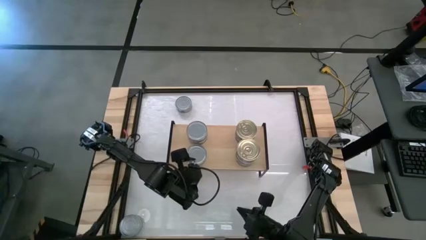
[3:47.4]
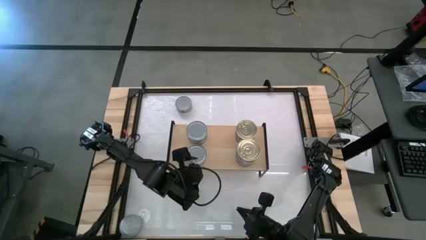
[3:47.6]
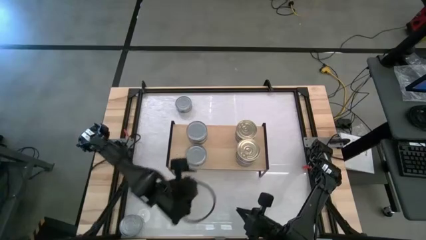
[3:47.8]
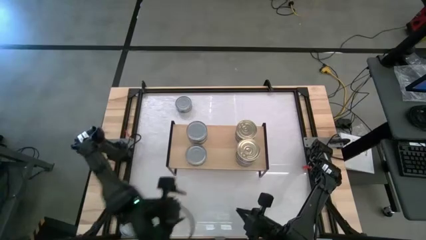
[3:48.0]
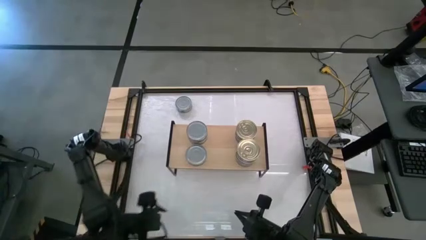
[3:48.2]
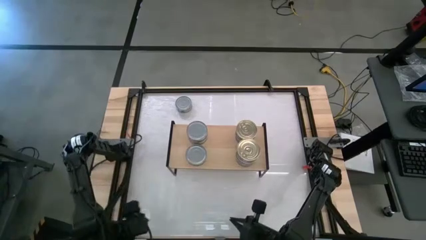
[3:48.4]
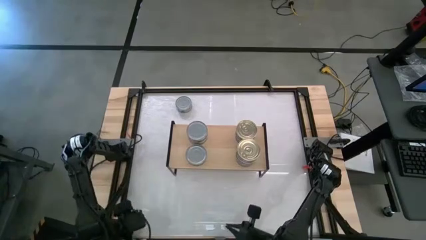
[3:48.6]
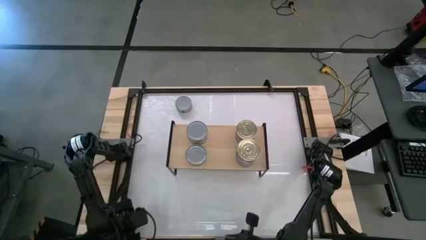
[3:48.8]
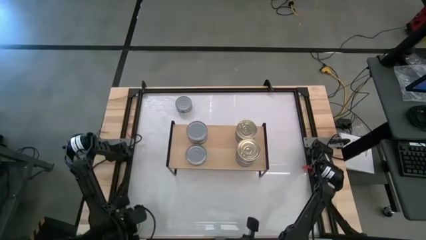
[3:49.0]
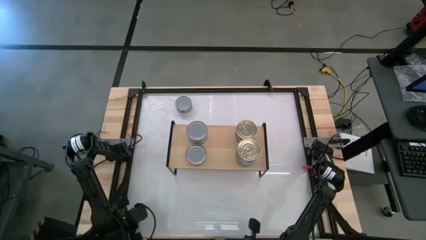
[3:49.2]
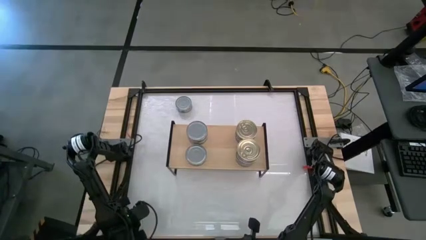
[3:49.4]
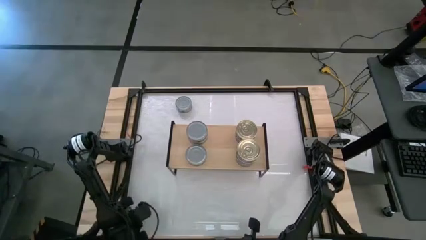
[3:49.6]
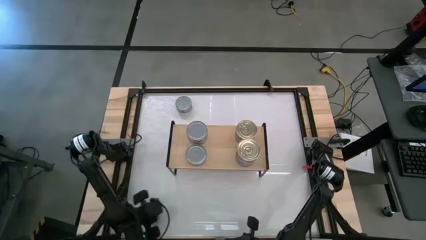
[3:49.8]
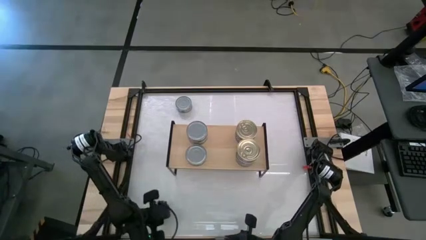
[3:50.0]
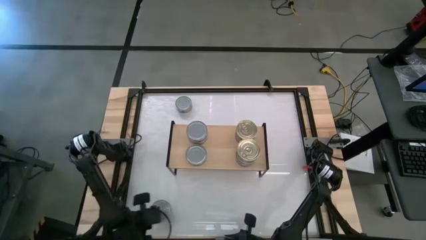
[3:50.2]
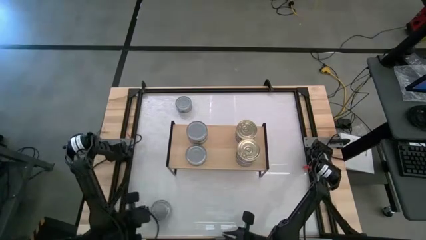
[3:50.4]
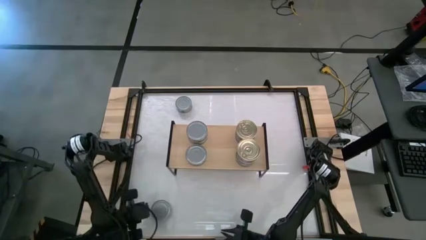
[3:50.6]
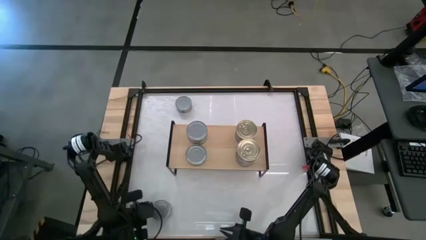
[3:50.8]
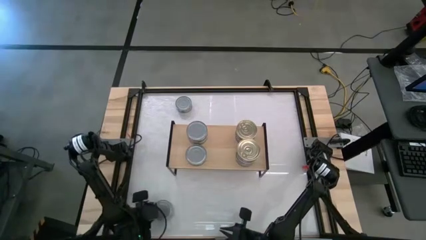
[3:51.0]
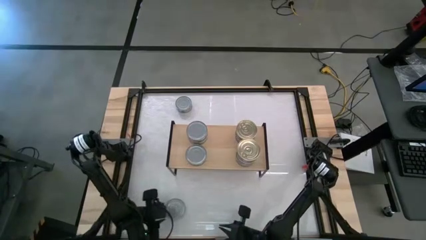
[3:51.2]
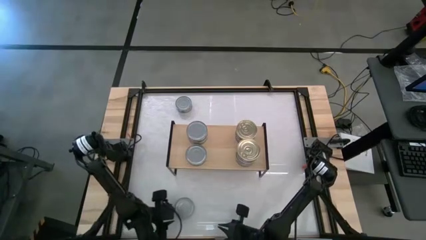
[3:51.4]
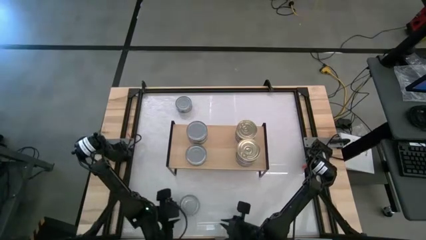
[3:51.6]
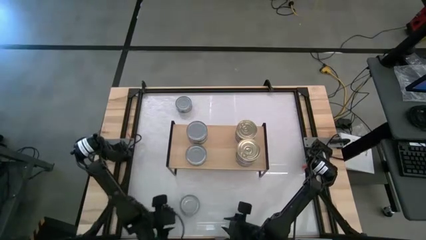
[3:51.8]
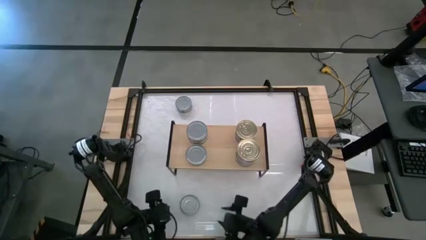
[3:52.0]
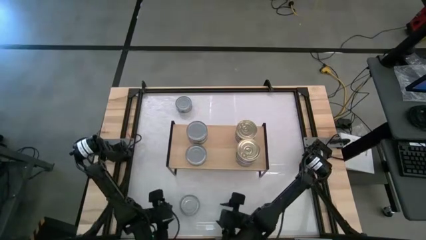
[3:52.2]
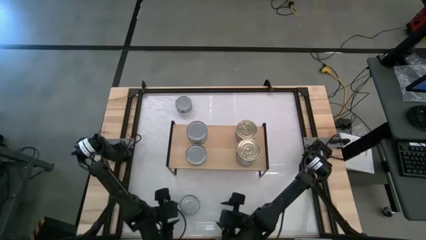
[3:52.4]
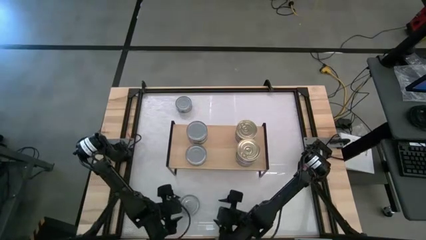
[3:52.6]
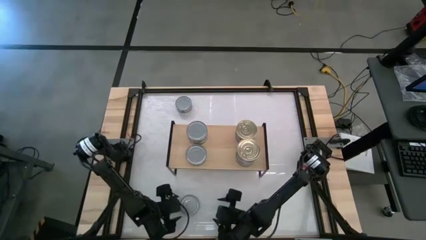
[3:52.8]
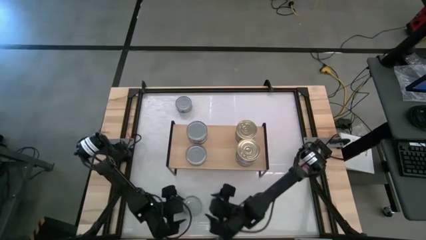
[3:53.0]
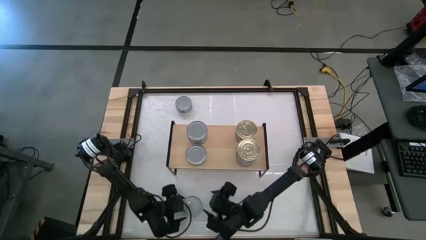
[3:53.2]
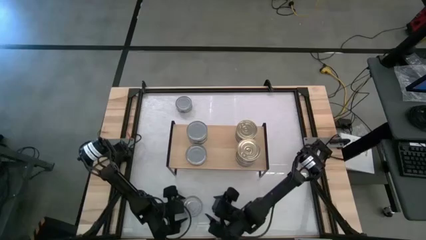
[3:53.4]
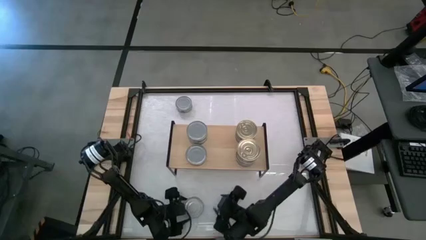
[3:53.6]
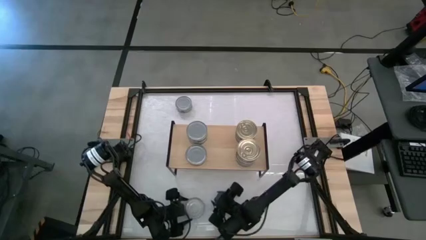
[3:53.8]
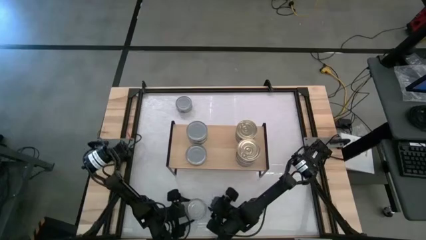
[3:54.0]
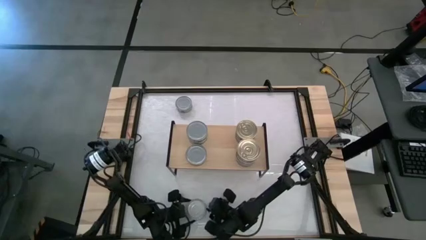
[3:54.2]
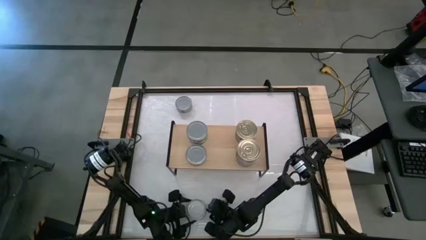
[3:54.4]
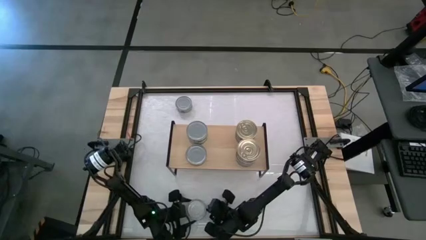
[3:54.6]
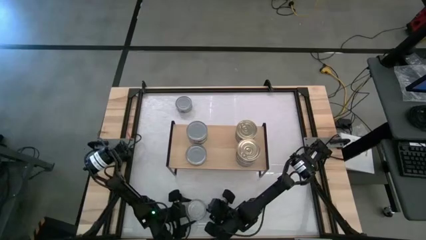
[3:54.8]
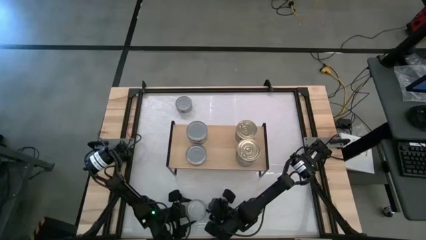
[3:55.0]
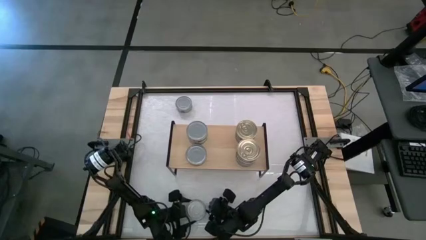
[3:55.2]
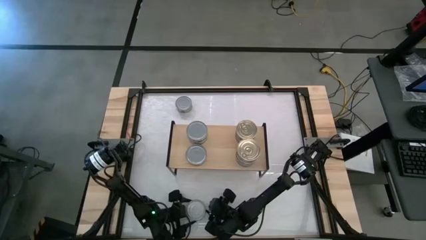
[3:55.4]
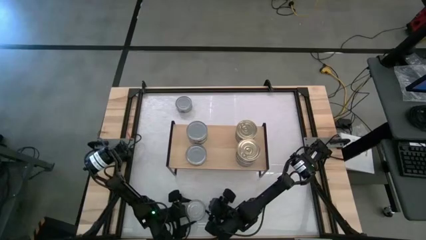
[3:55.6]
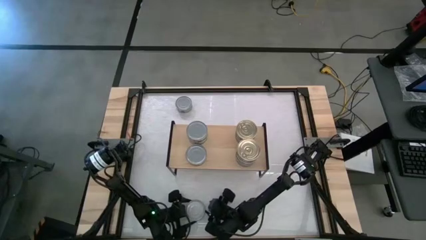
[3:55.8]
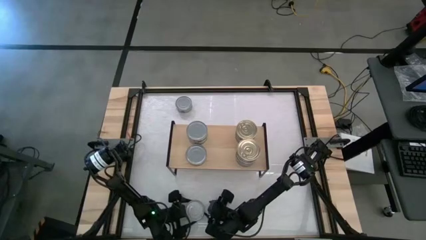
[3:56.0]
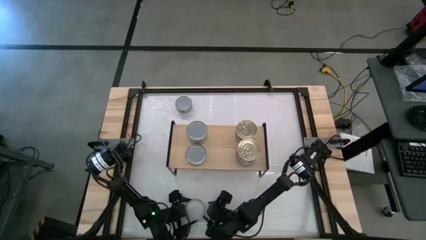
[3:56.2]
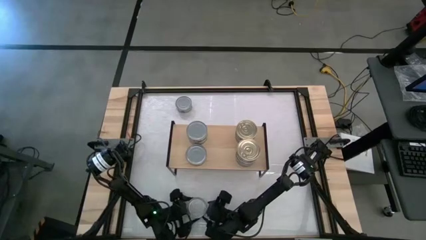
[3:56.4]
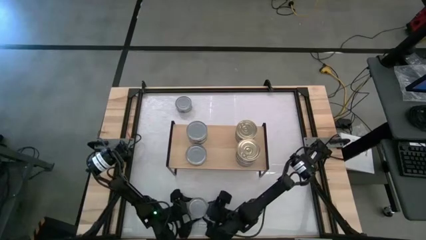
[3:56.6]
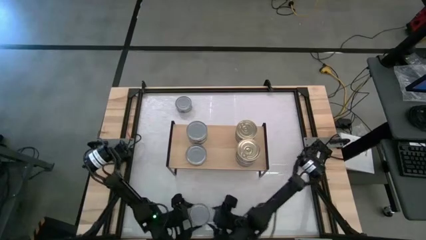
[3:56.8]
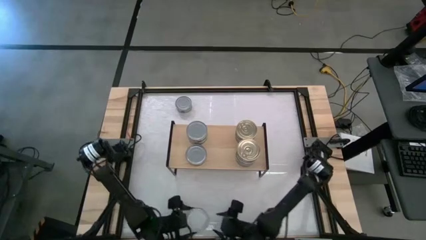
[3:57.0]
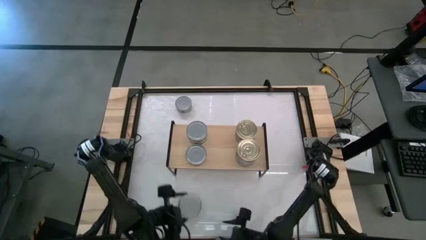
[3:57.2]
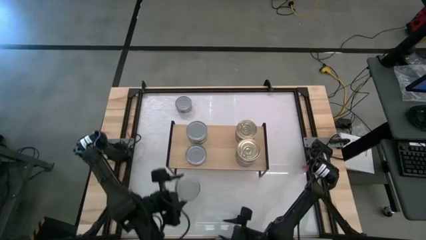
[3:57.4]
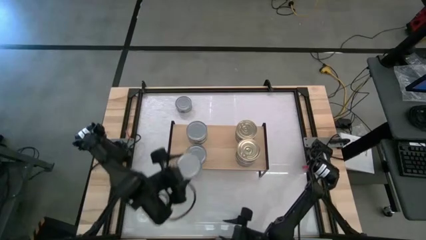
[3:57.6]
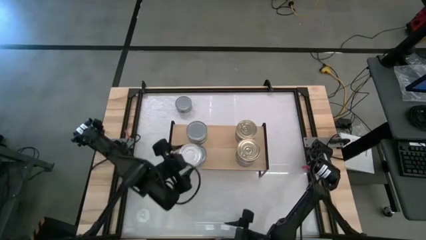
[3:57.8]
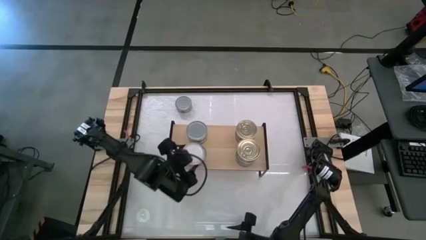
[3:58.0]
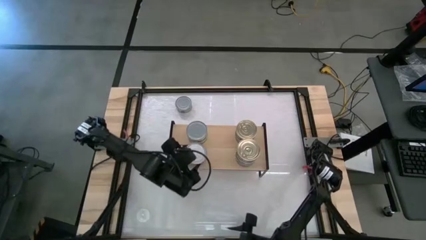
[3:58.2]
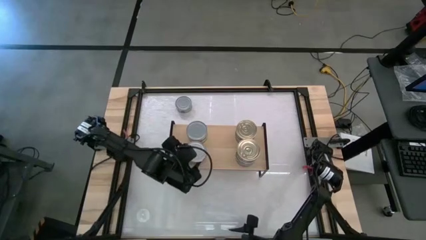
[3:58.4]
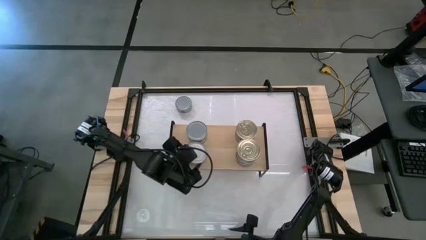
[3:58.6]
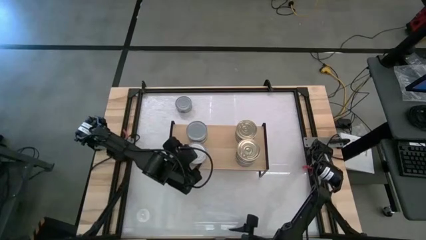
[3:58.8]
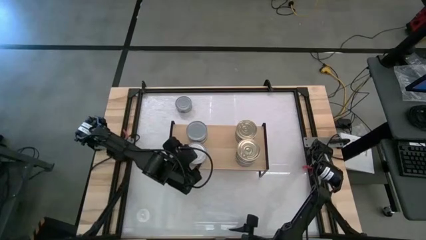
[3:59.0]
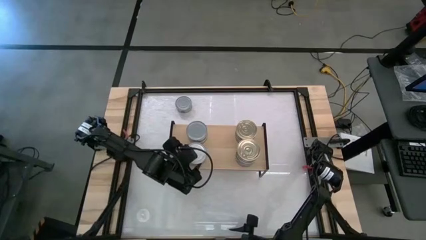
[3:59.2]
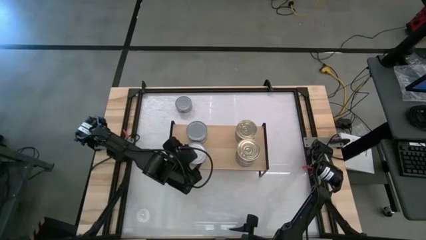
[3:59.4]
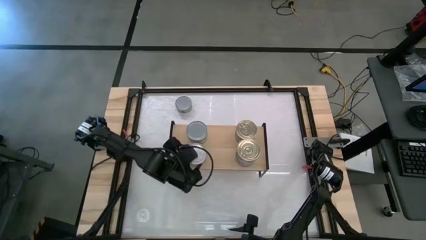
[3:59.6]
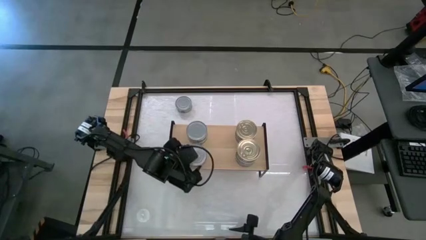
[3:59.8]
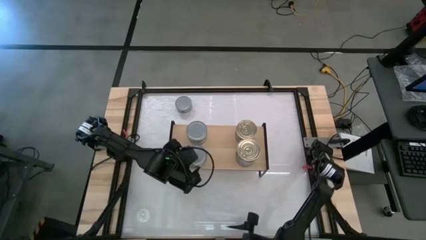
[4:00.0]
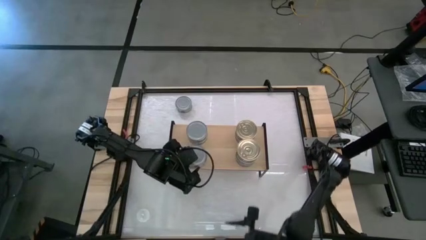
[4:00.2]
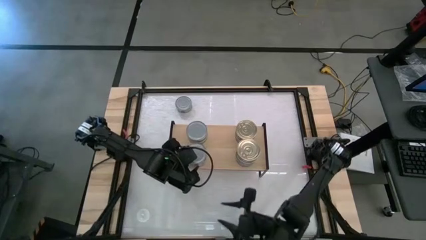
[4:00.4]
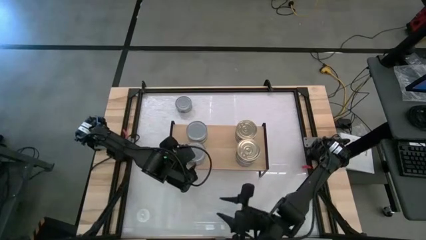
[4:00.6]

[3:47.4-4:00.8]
Task: Stack canned seafood by type on shelf
Stack the green tuna can on top of the other green tuna can on the shelf

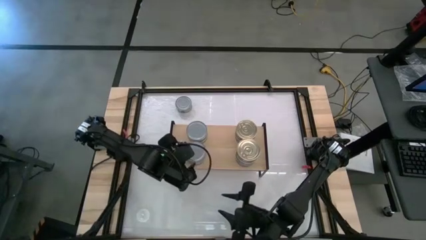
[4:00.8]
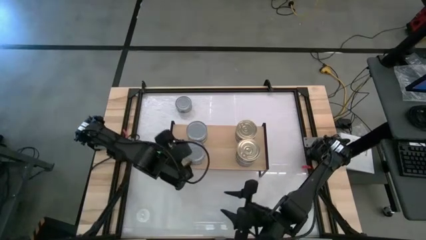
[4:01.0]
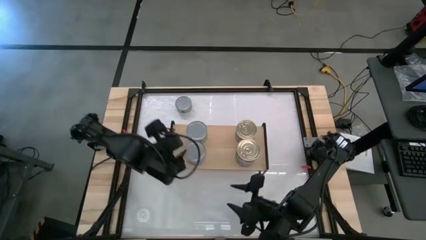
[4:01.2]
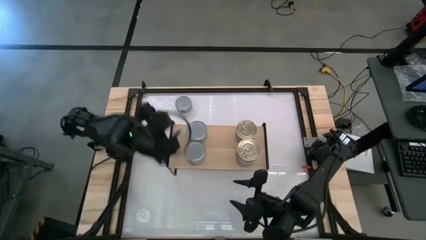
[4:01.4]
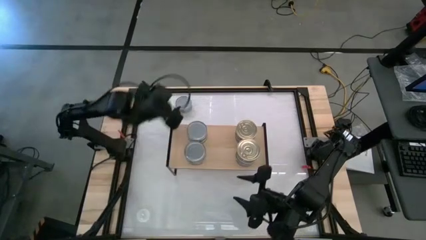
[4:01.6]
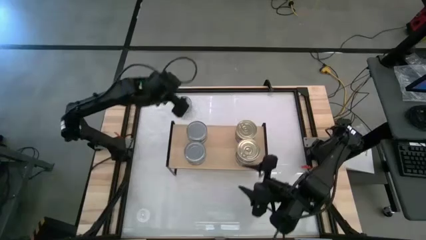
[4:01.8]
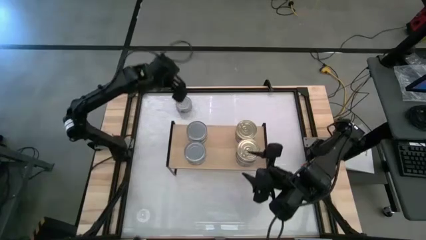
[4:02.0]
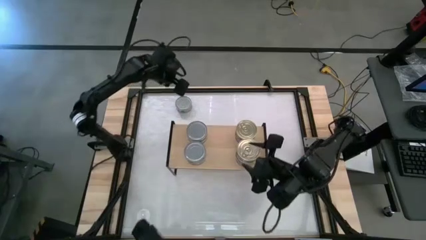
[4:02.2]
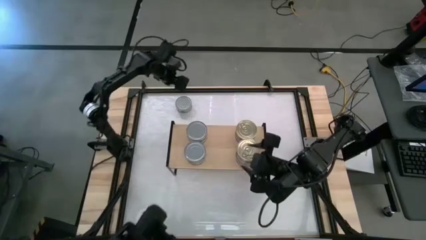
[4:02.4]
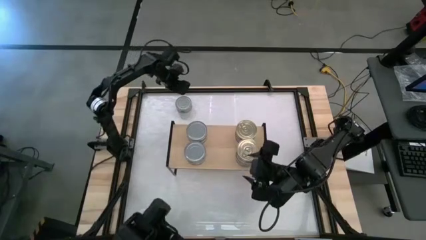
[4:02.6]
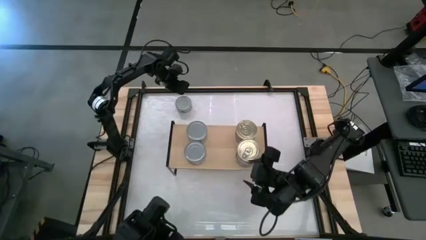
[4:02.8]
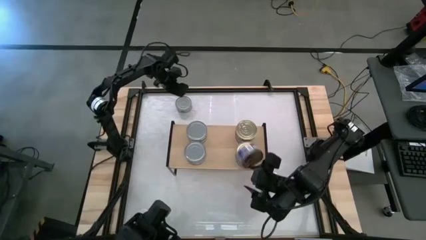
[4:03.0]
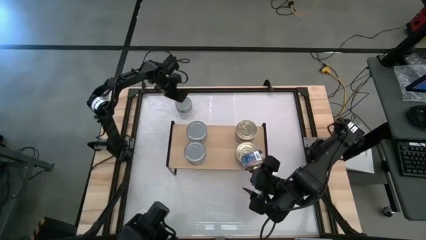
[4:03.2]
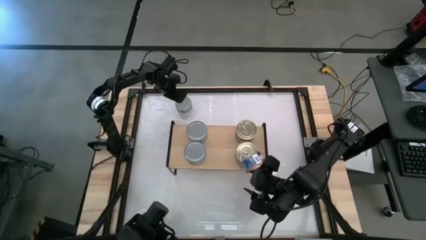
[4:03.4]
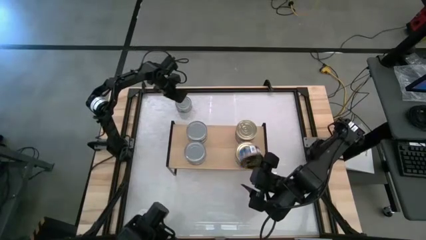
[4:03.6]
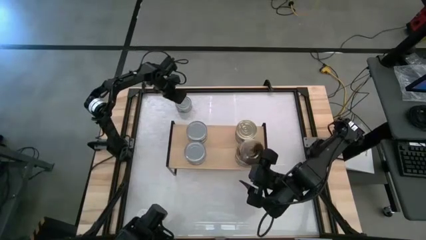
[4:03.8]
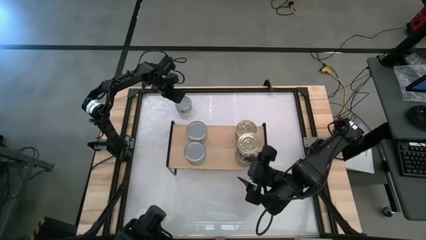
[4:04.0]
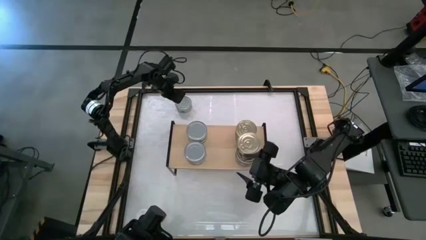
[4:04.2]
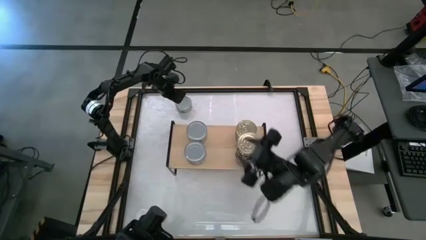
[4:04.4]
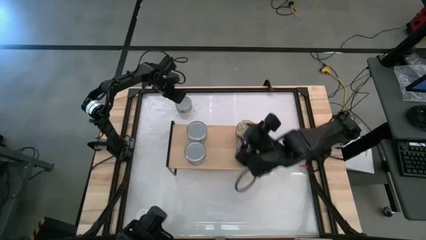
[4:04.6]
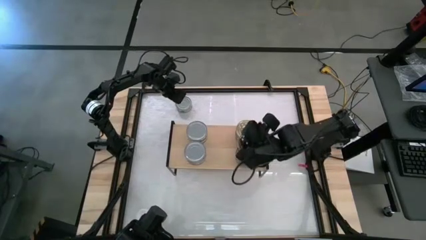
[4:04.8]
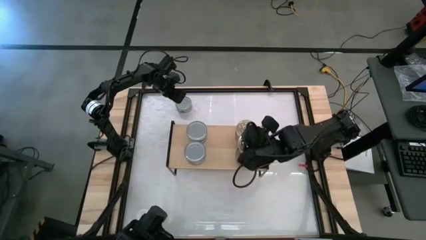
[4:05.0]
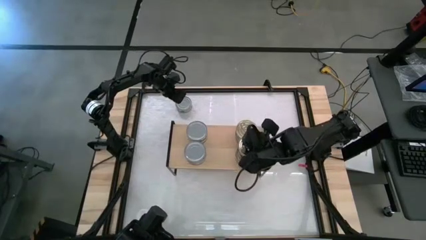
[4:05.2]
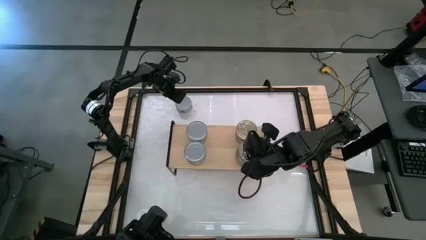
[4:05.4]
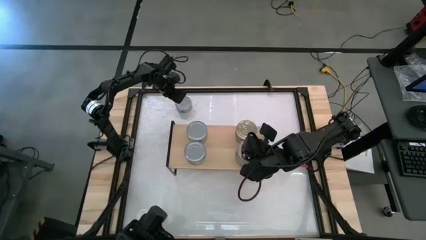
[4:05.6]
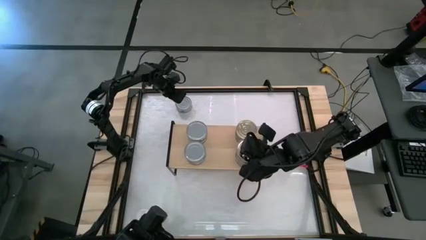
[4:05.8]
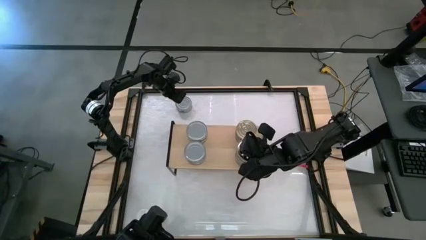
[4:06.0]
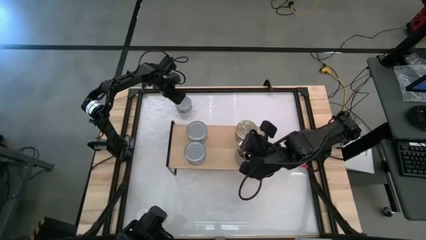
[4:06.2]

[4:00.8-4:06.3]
Adjust the blue-pink tuna can
